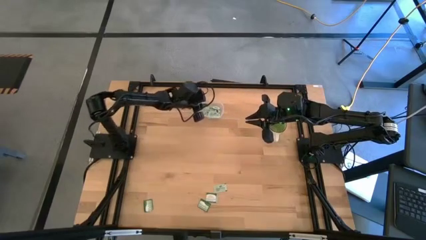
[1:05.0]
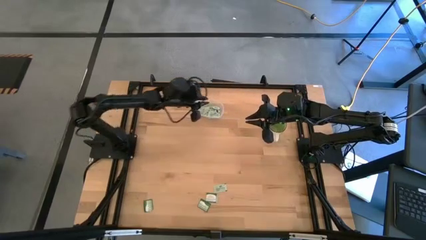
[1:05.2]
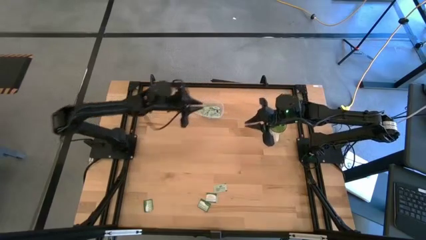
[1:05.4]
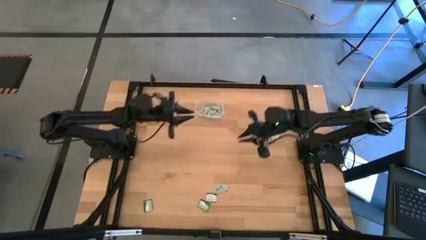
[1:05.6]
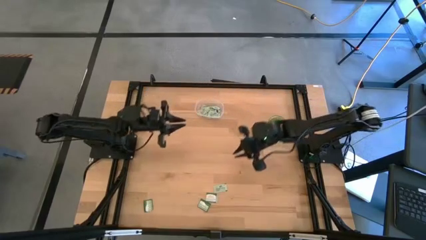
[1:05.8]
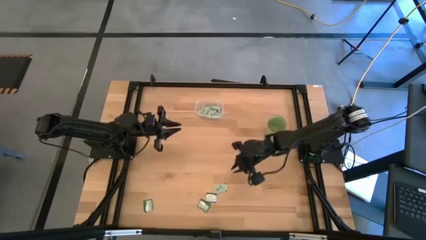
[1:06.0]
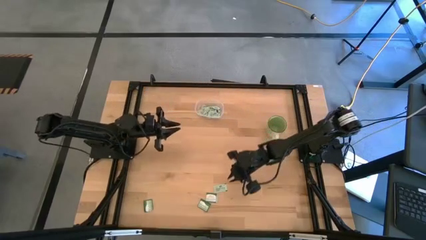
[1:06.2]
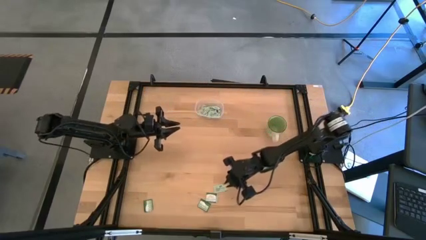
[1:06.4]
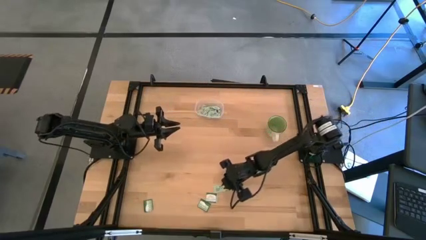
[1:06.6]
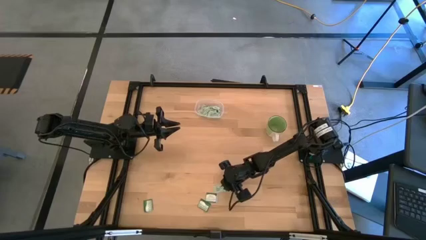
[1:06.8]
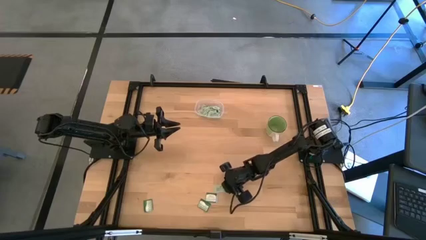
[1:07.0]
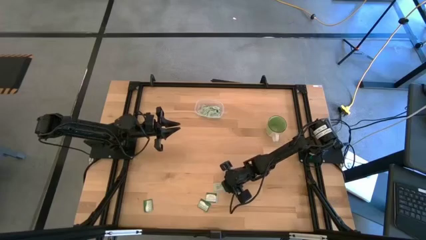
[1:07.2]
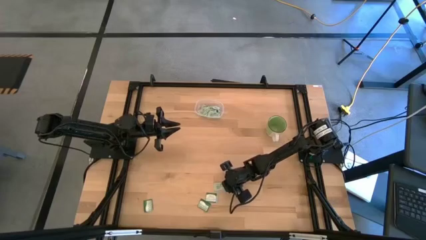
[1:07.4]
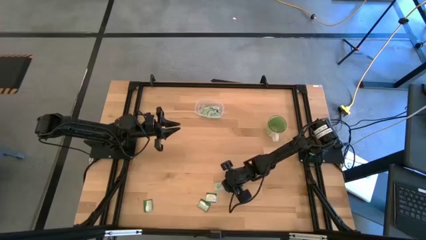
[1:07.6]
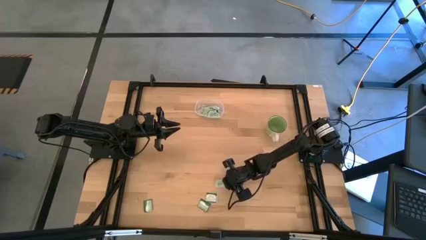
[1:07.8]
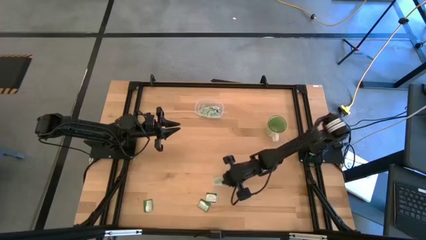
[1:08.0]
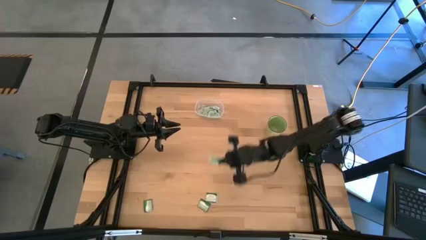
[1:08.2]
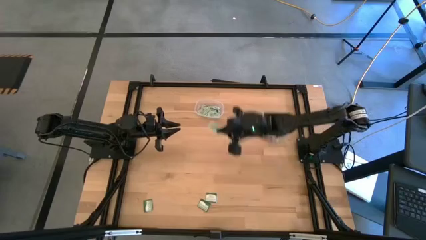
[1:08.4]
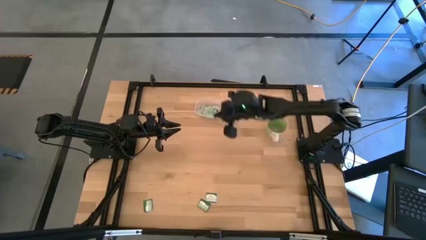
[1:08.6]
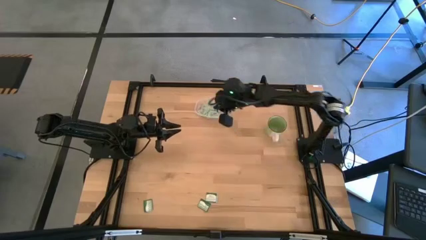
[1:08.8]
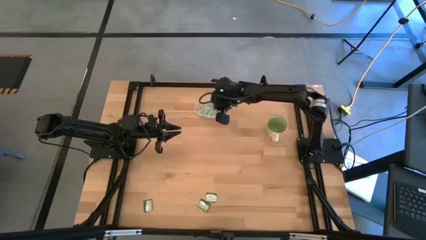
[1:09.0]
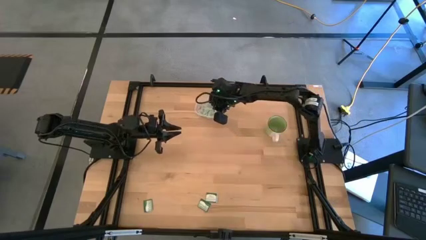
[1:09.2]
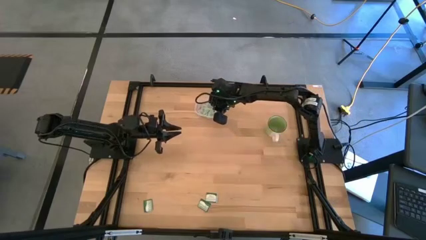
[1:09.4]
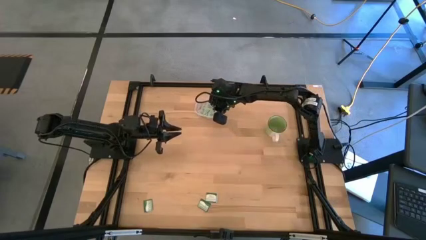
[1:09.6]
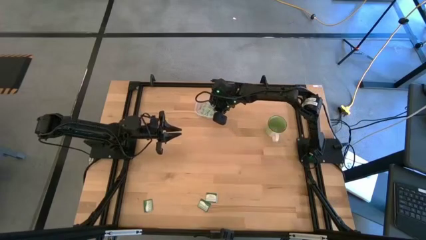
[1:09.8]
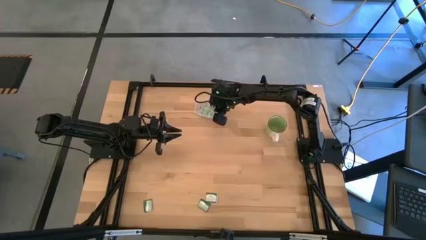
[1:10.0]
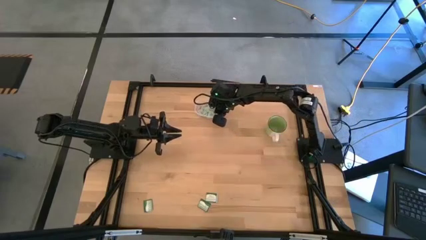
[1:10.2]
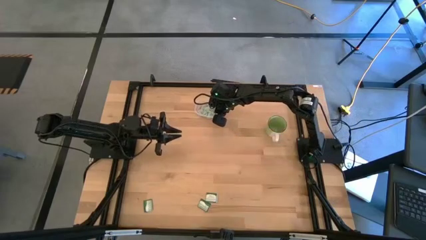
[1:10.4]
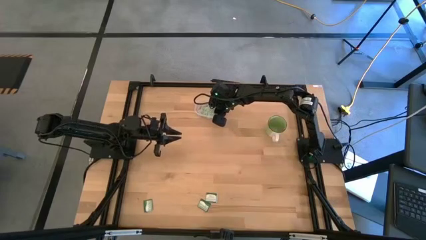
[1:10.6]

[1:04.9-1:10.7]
Task: Pick and place items into bin
Put the green stevia packet into the bin

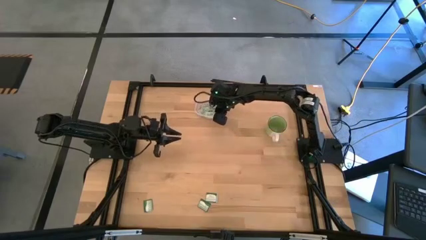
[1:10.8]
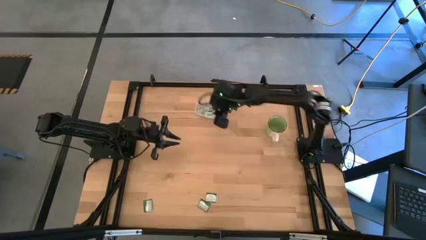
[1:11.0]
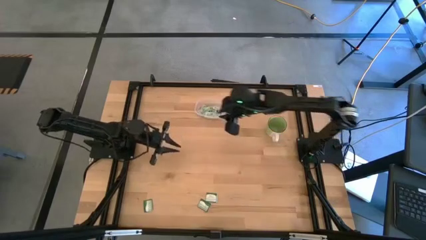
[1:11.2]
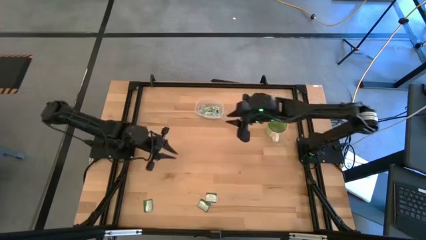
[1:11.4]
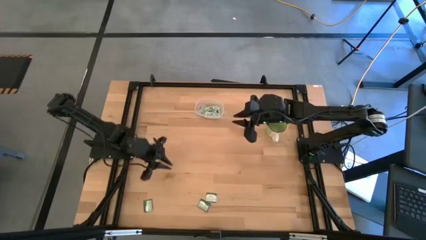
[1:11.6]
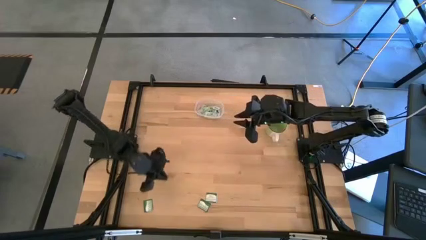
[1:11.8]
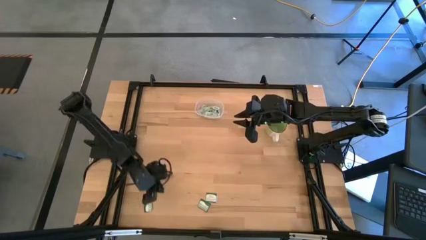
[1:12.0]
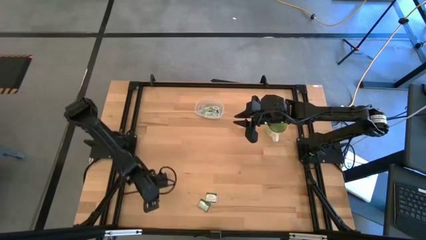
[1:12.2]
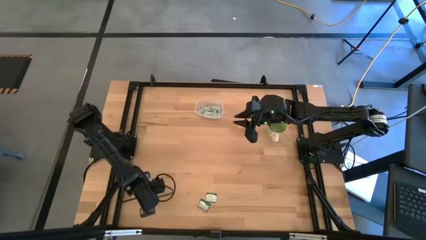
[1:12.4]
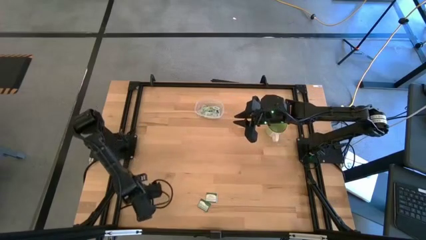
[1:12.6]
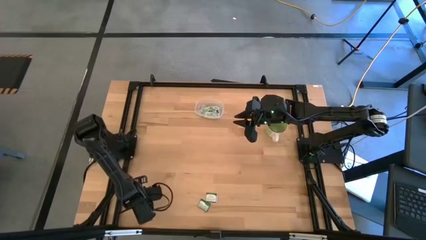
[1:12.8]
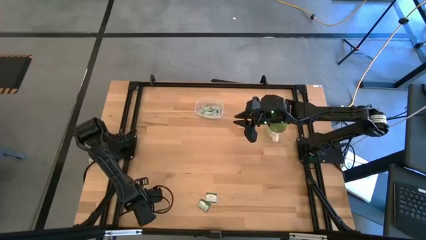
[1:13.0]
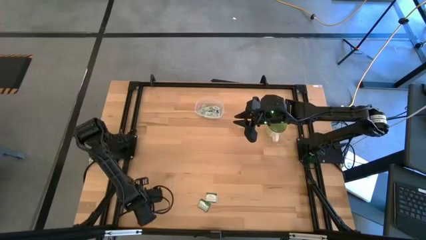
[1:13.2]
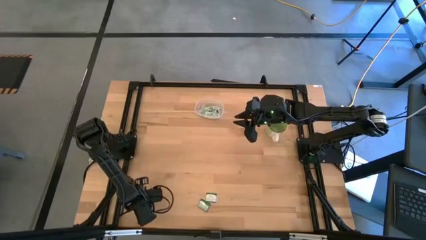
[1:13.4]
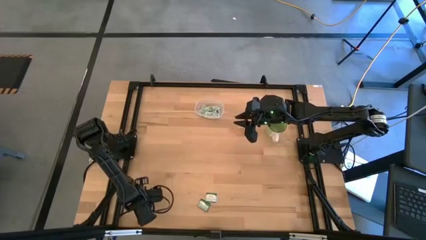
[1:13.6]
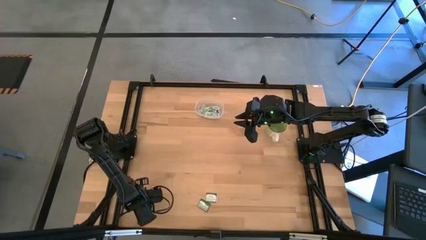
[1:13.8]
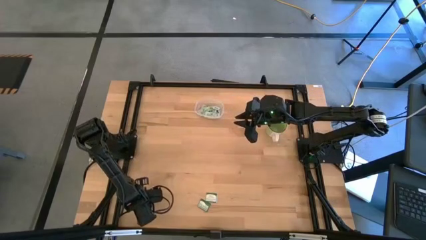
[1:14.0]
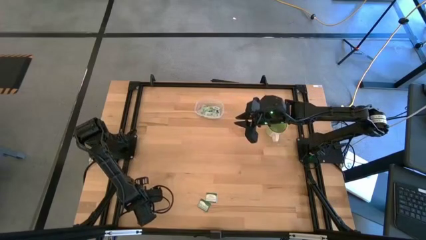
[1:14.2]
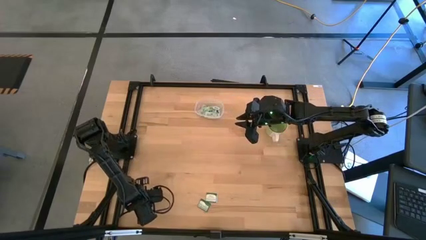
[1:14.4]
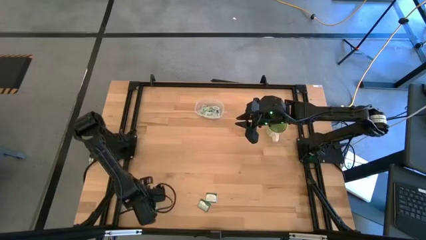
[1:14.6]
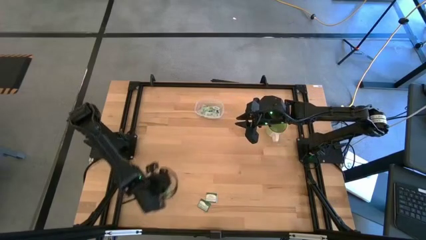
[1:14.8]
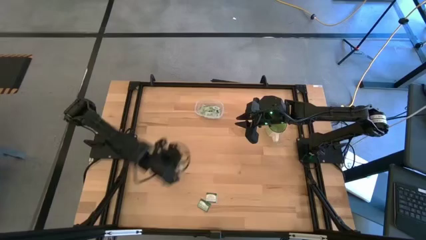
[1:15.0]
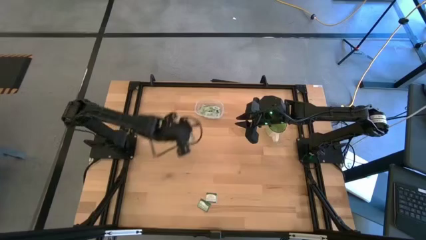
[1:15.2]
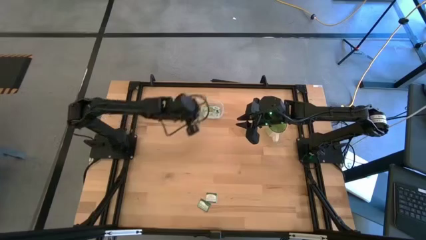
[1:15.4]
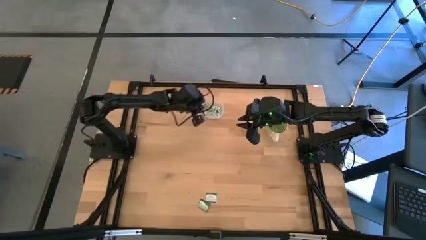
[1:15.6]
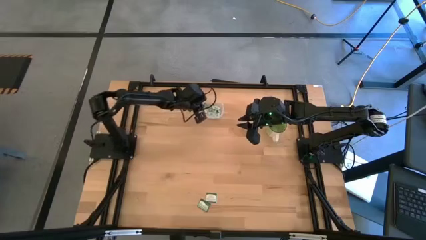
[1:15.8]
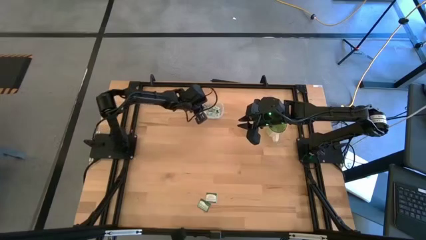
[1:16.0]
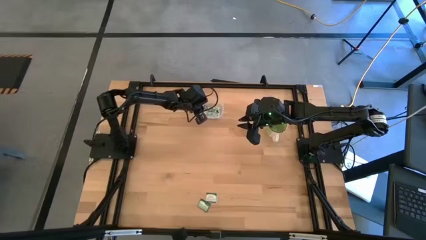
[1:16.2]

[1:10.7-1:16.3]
Put the bottom left white stevia packet into the bin

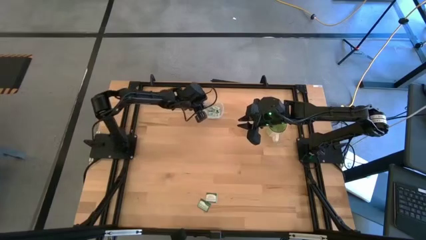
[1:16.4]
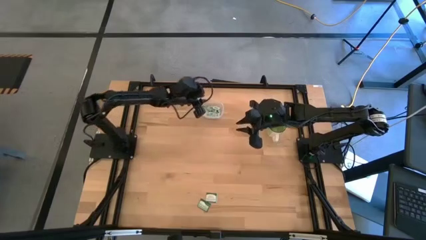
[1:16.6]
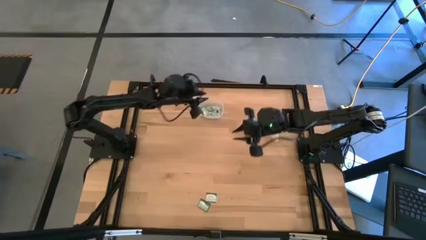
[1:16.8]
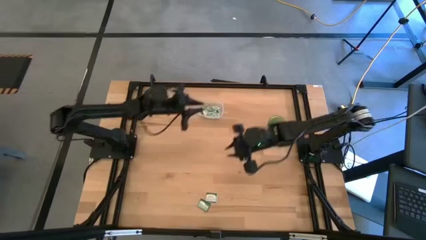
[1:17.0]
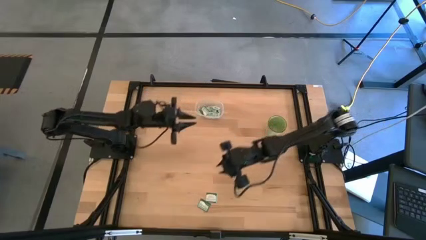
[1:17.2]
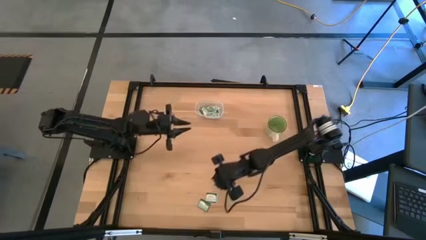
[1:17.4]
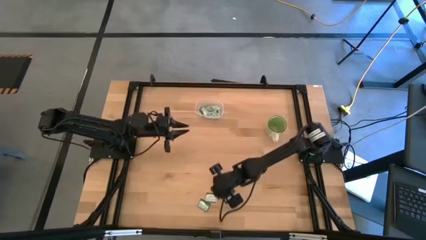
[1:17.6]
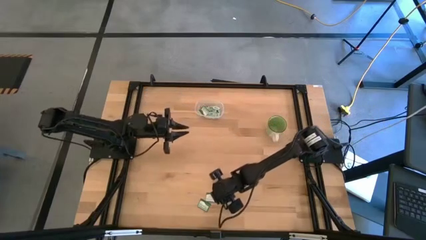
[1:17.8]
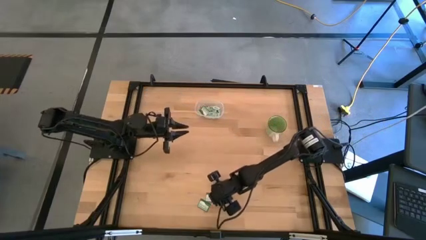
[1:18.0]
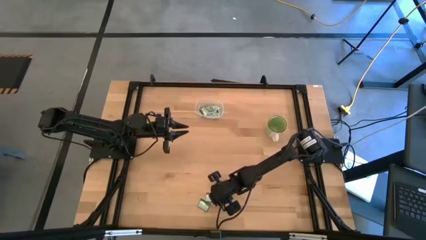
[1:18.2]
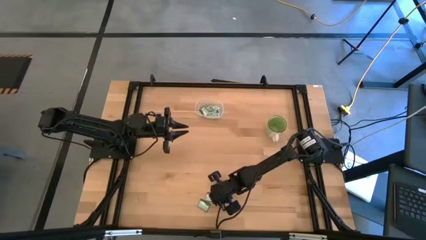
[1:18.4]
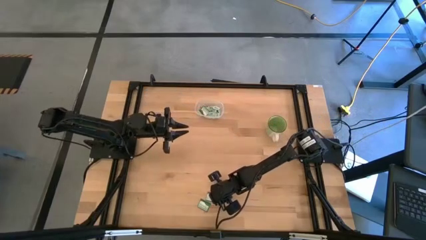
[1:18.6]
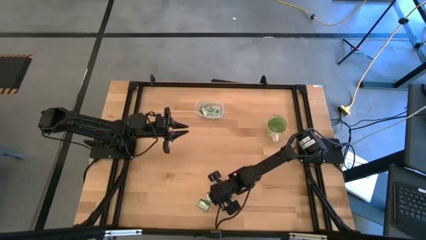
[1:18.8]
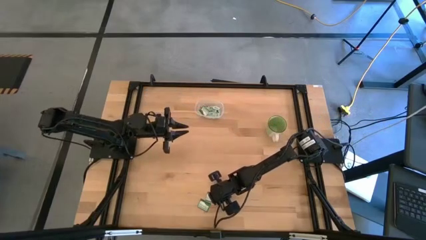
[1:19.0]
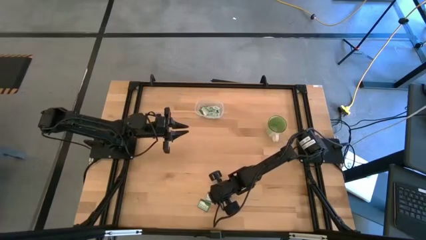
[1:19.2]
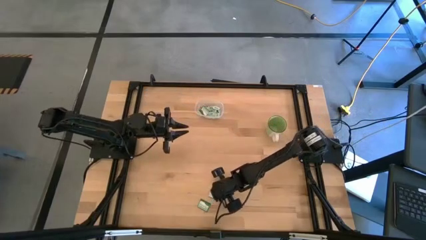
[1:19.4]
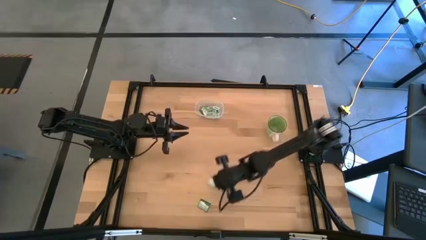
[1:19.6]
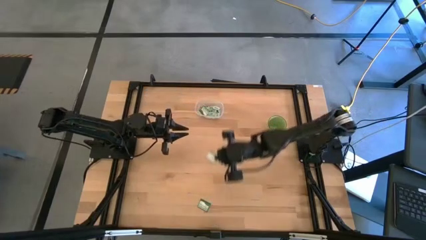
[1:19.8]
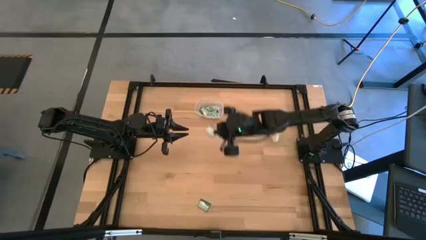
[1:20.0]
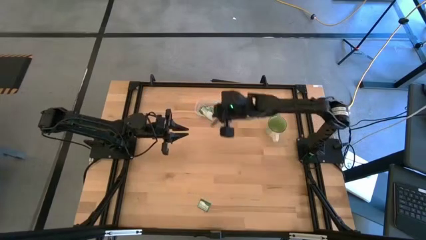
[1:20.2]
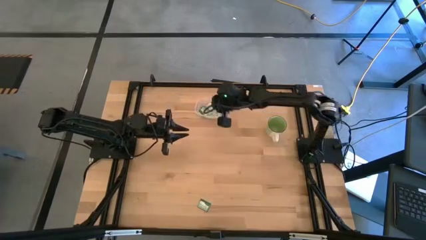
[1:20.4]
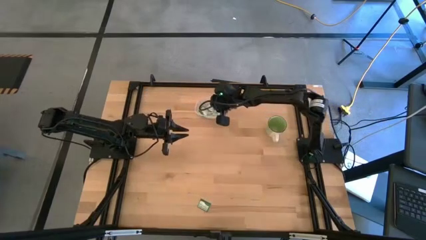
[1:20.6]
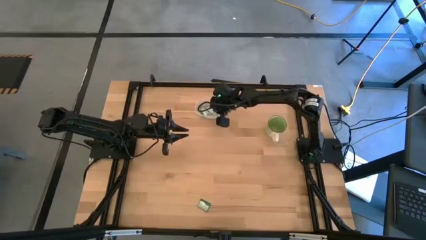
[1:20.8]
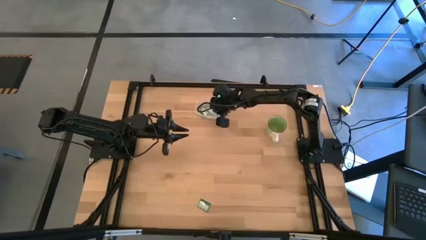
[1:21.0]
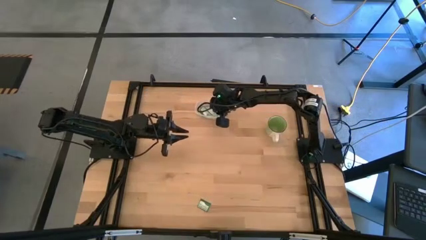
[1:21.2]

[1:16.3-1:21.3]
Put the top white stevia packet into the bin
